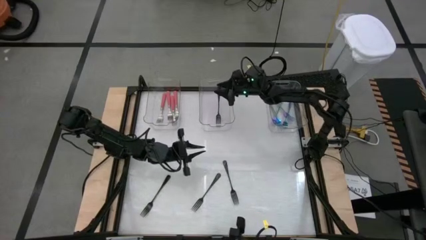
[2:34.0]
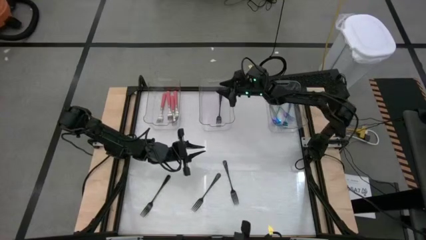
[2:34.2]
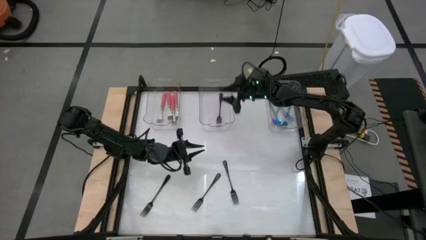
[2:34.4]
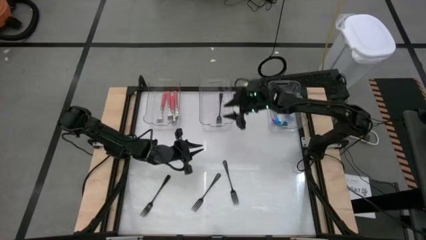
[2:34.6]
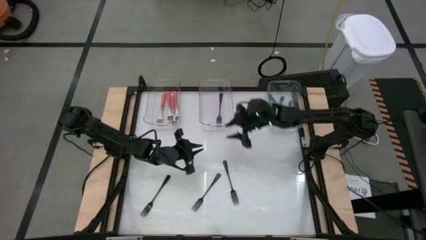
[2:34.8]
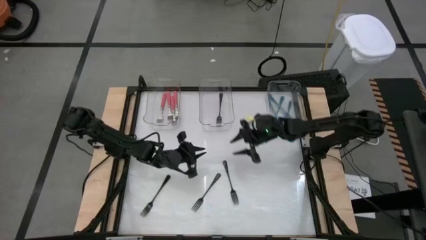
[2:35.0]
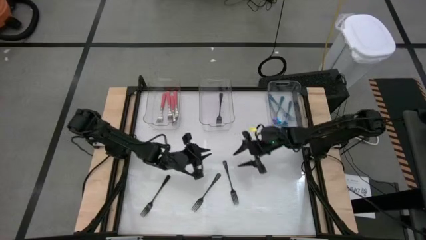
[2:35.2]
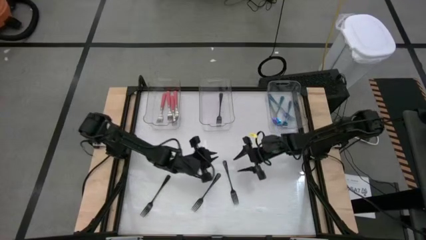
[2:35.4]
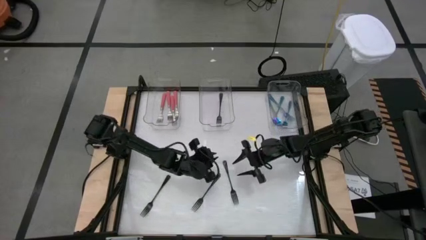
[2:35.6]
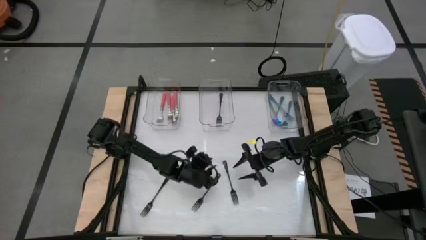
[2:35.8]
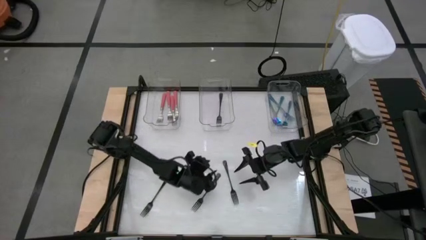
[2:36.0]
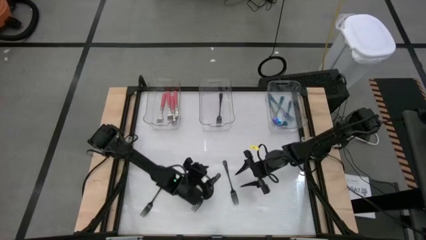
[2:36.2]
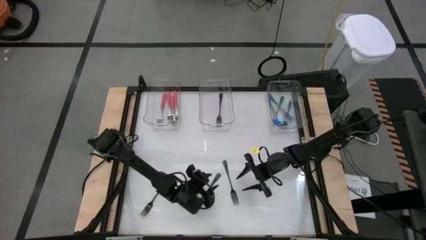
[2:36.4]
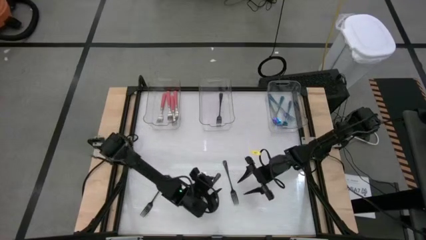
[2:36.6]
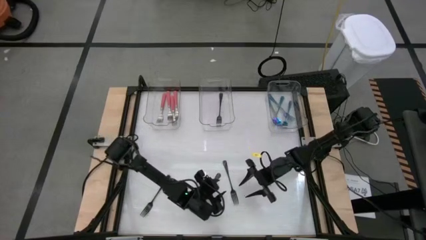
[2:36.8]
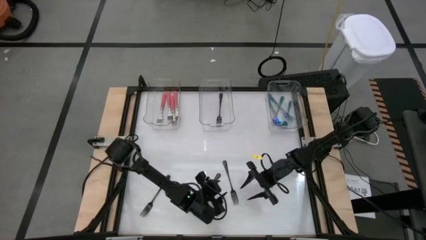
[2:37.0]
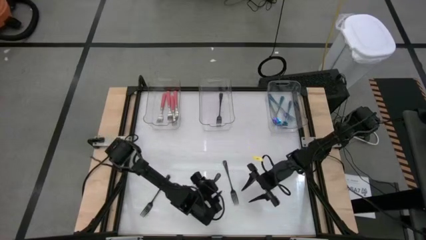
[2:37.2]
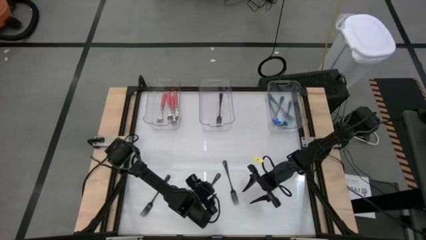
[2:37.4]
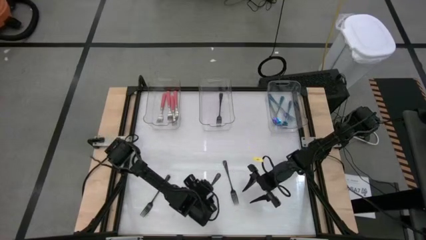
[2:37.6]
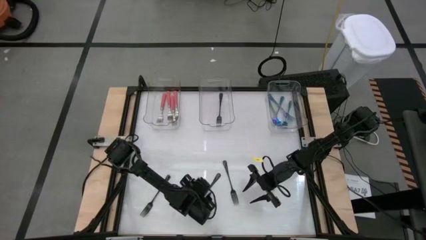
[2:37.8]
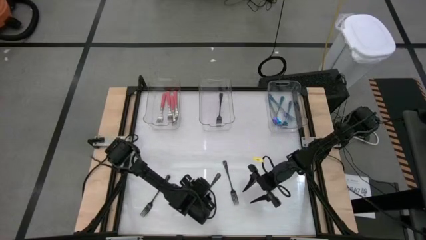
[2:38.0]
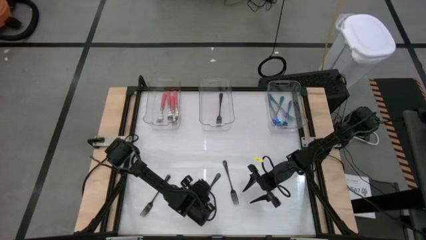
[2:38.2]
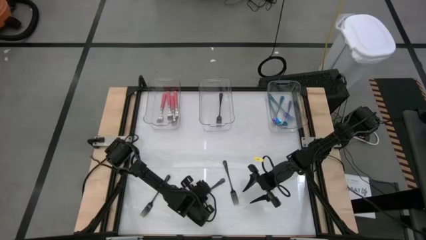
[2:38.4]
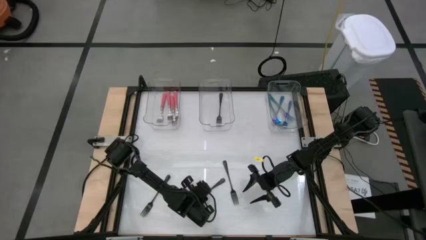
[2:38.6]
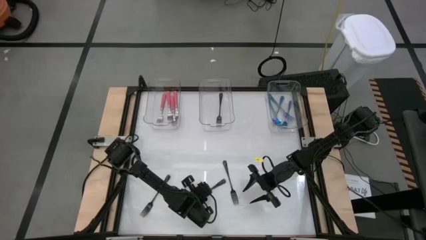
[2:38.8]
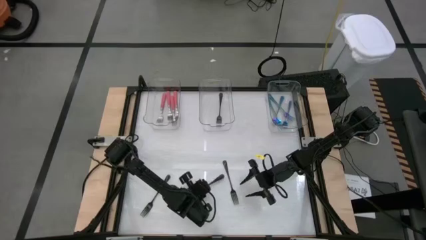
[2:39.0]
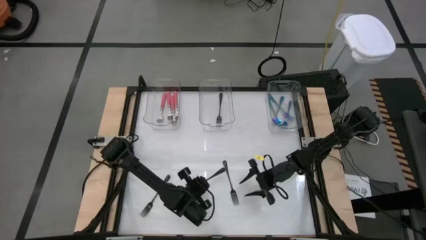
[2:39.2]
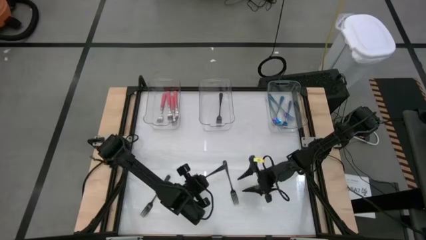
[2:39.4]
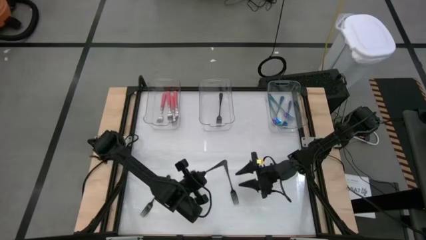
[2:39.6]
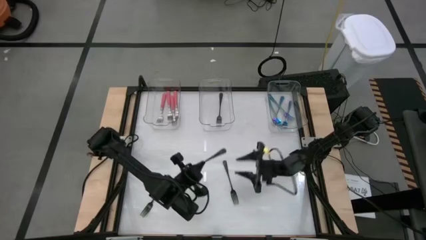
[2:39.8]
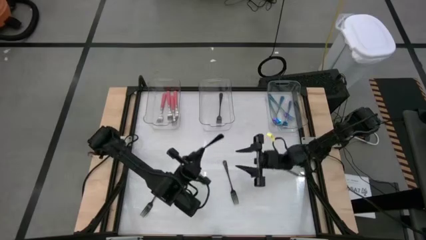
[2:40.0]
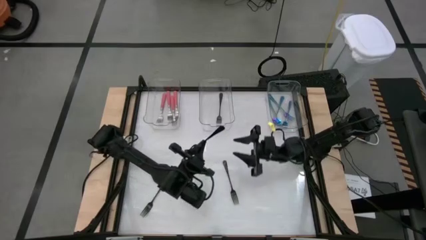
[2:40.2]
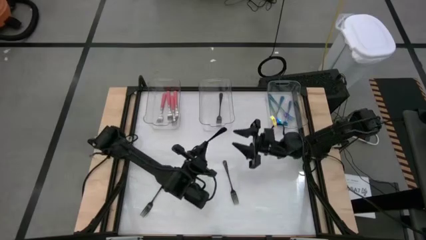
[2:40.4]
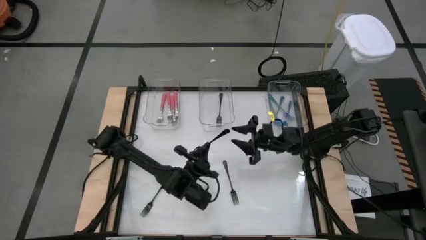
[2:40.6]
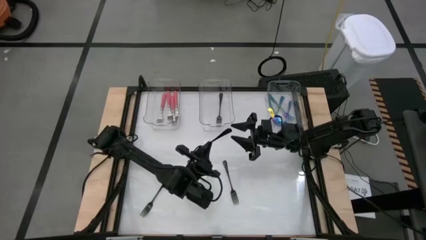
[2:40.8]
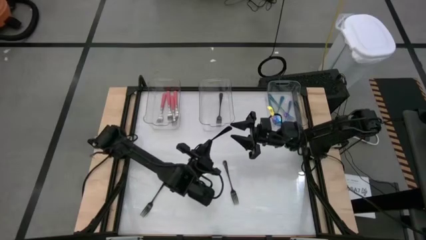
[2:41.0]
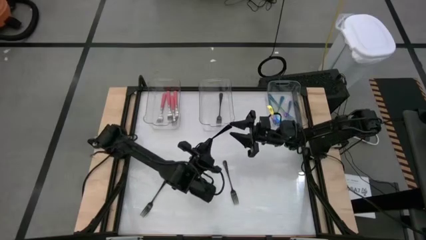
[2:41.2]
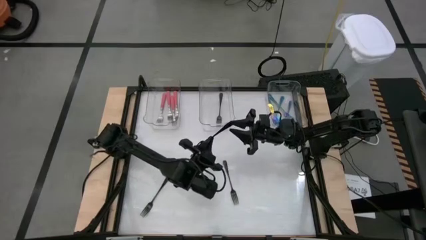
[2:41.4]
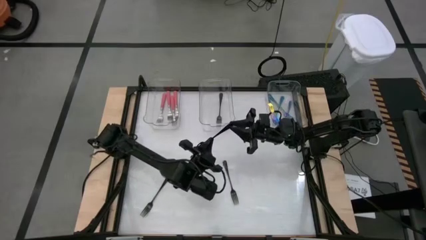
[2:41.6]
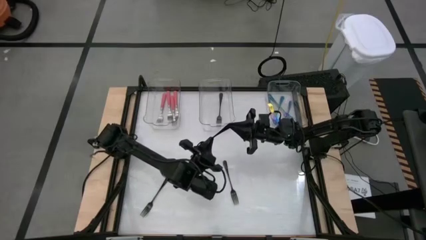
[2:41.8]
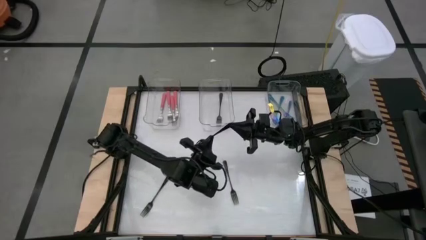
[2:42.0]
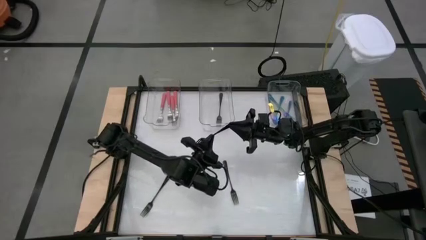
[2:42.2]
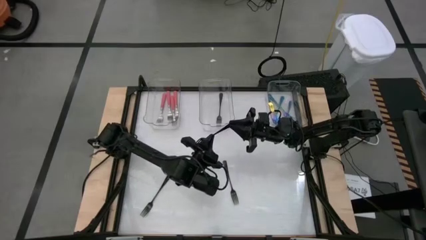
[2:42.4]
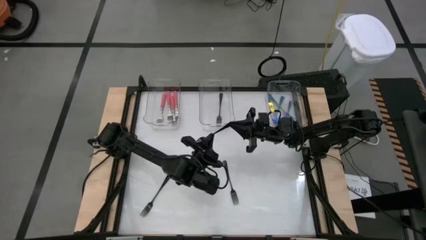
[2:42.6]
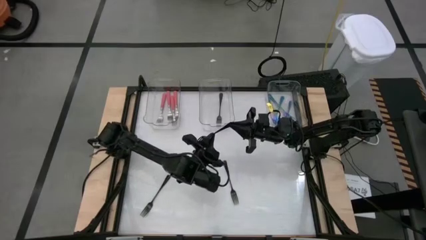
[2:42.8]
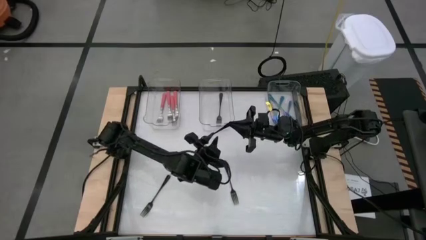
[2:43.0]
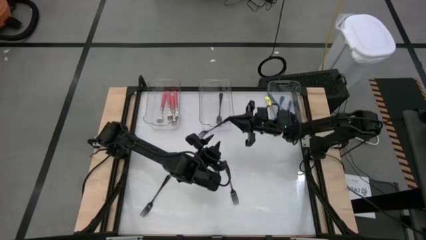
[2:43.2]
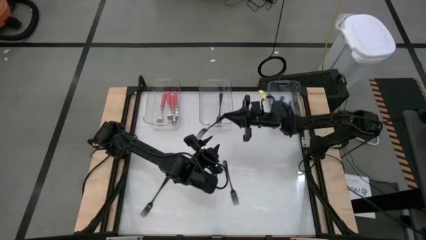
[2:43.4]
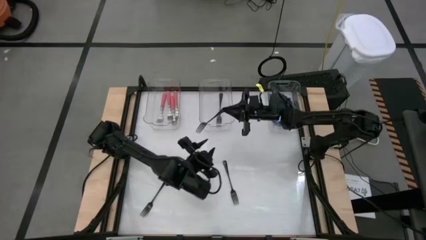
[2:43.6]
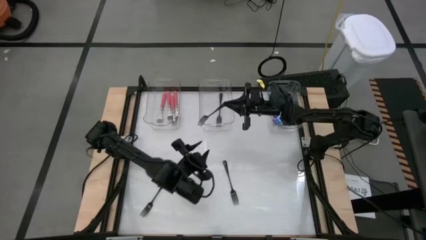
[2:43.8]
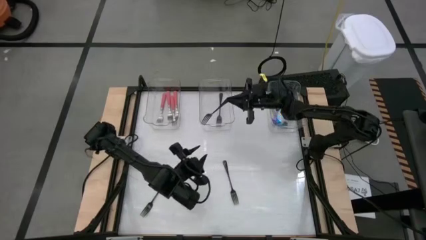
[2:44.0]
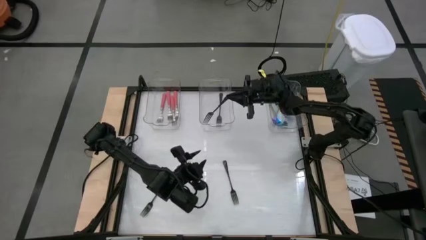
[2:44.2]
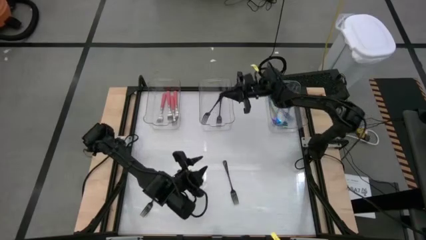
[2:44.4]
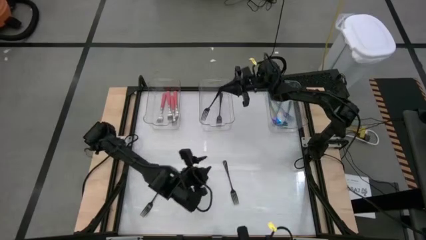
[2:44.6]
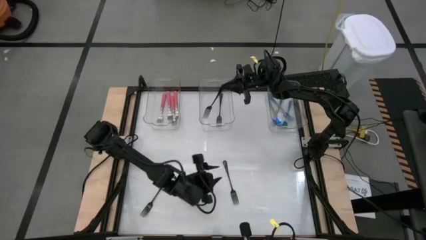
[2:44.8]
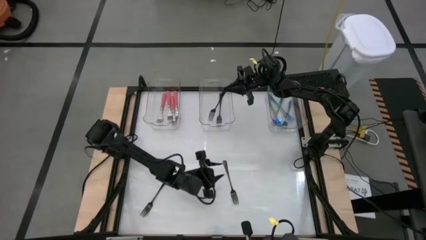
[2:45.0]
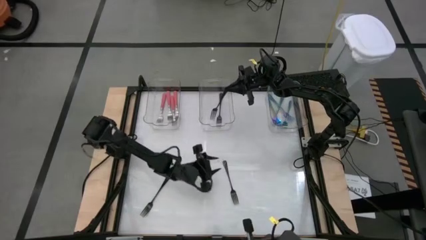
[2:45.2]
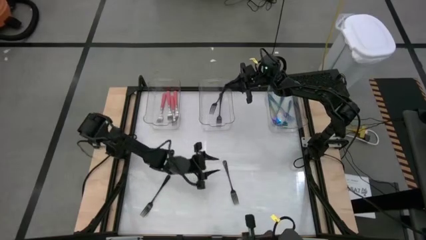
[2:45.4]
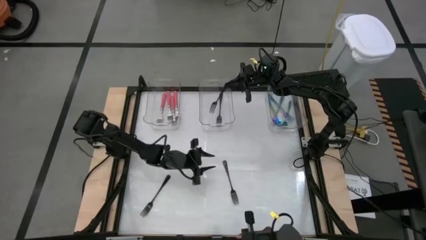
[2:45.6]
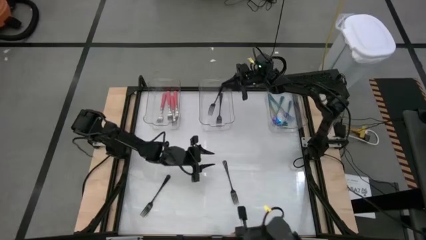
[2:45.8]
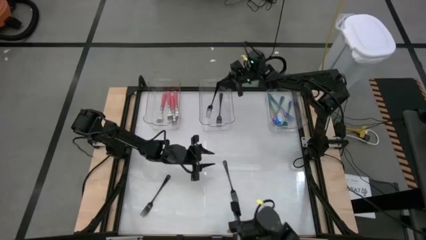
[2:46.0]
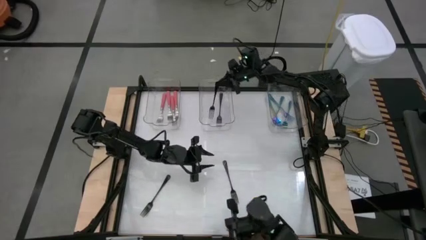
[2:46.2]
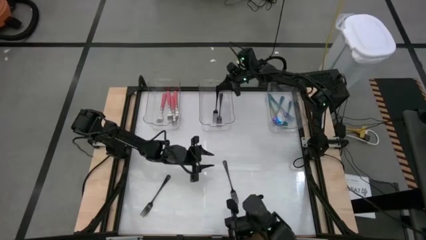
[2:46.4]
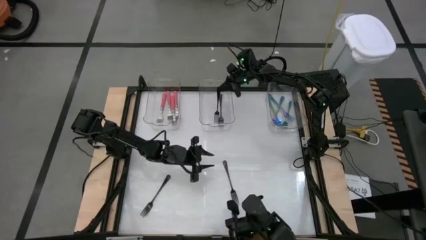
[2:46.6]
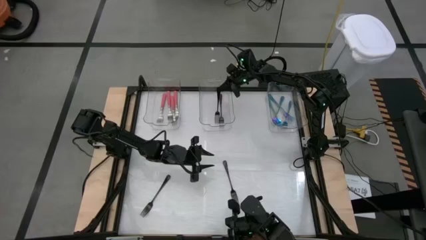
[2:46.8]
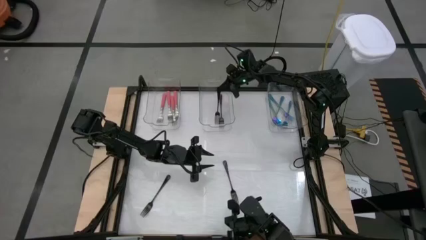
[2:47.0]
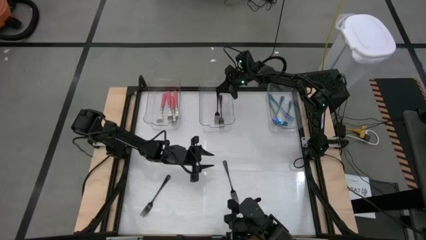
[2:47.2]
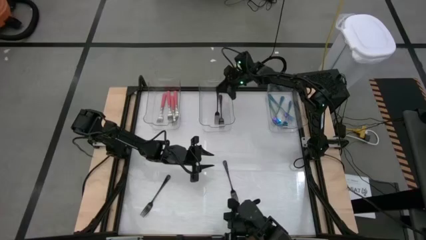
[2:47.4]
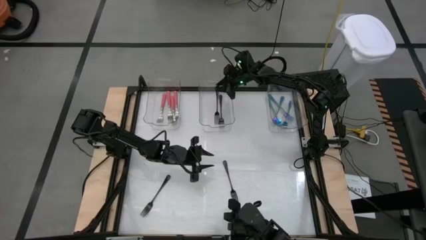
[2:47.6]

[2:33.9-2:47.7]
Task: Sort silverware by color (type)
Put the black fork into the middle transparent bin
